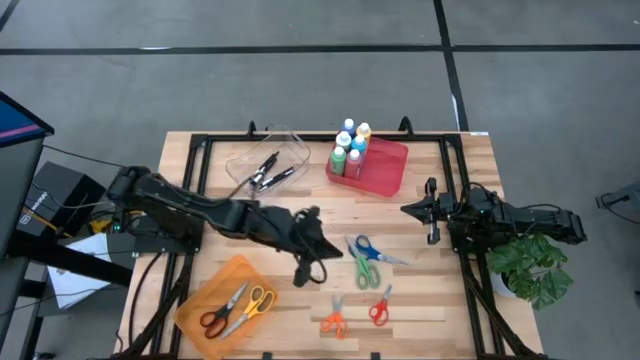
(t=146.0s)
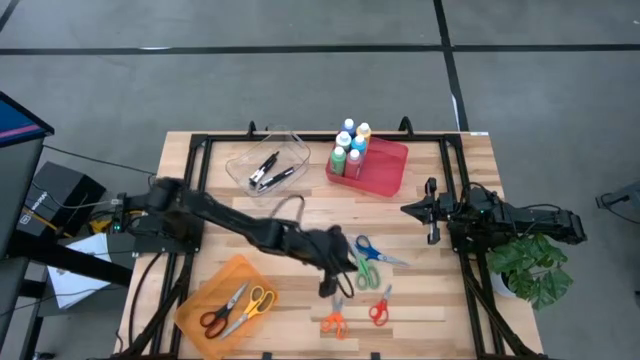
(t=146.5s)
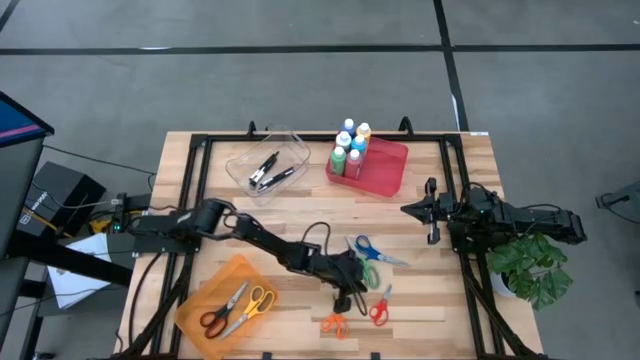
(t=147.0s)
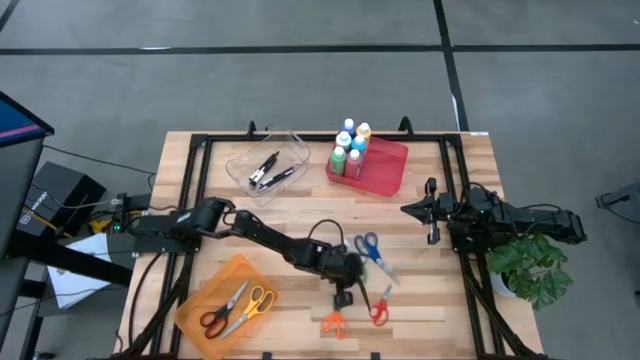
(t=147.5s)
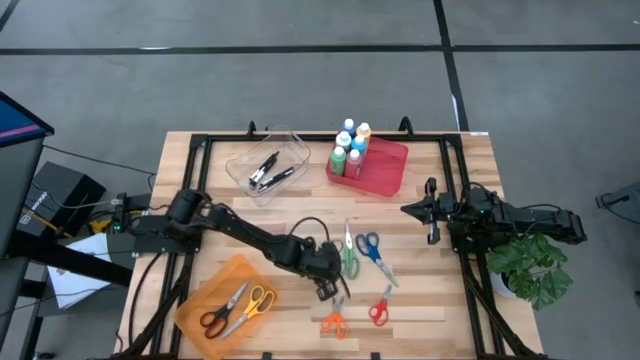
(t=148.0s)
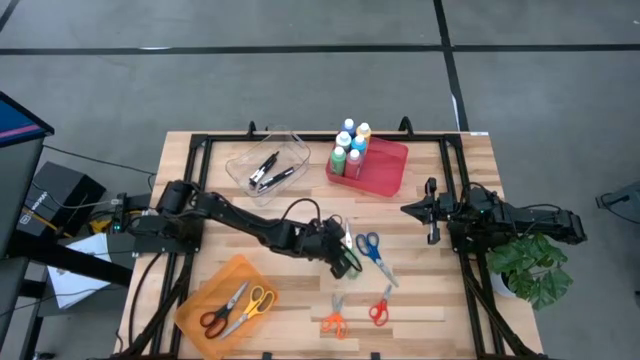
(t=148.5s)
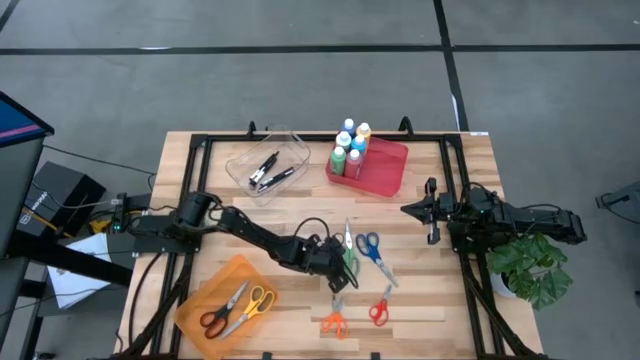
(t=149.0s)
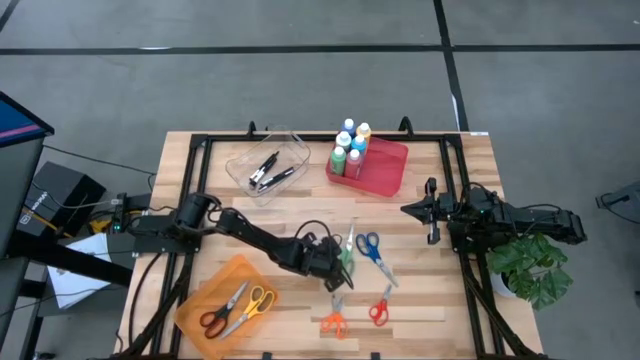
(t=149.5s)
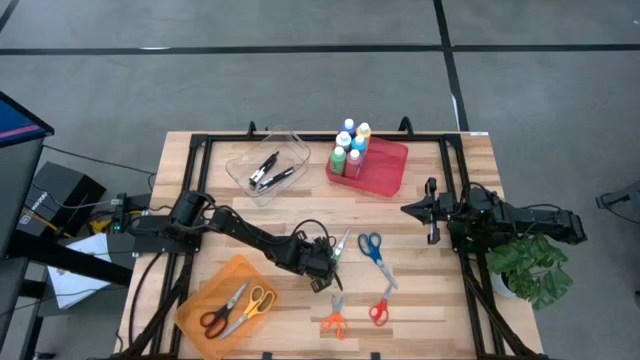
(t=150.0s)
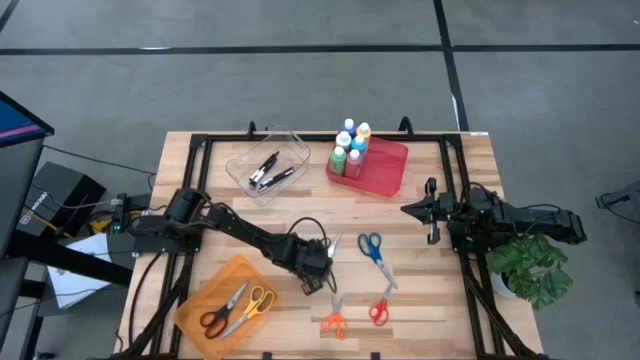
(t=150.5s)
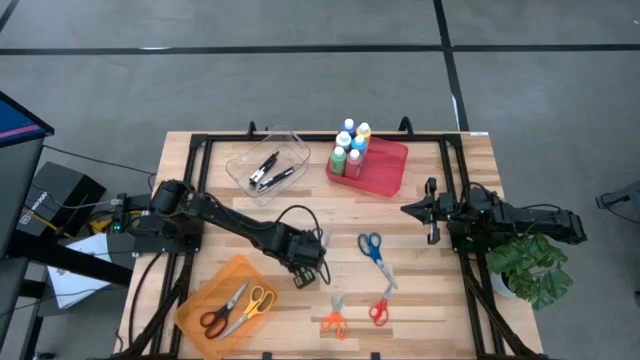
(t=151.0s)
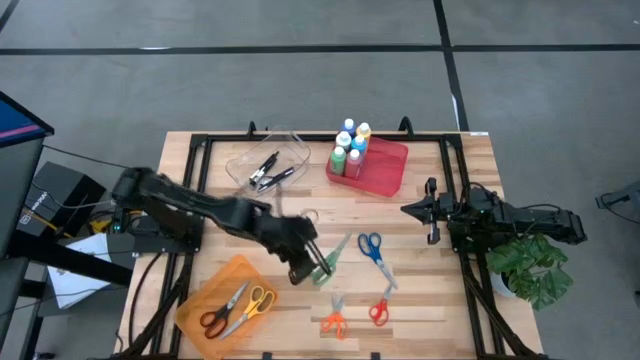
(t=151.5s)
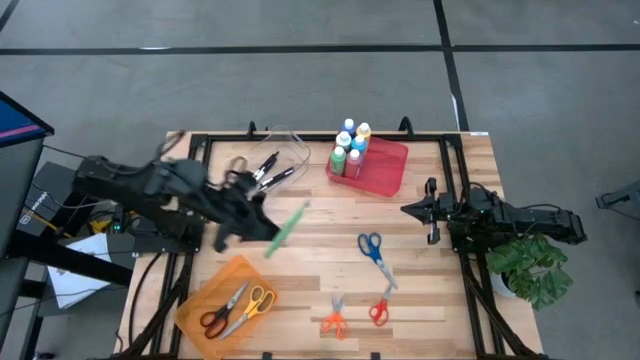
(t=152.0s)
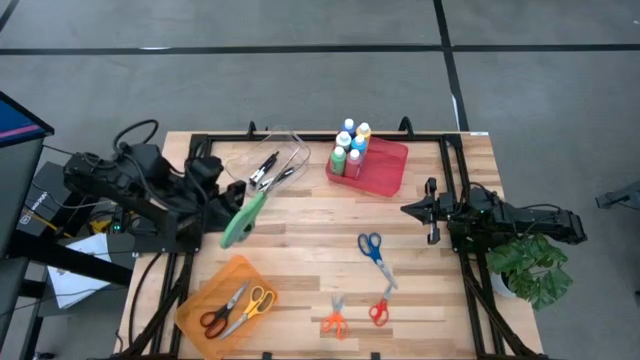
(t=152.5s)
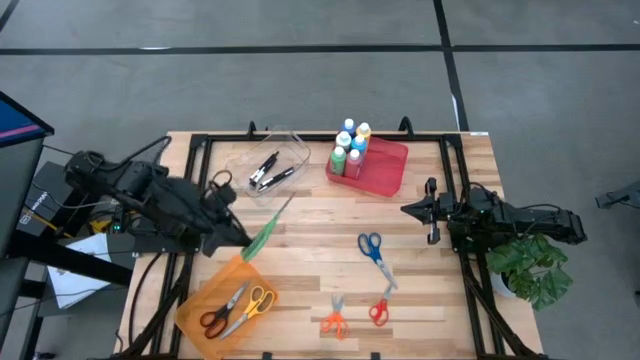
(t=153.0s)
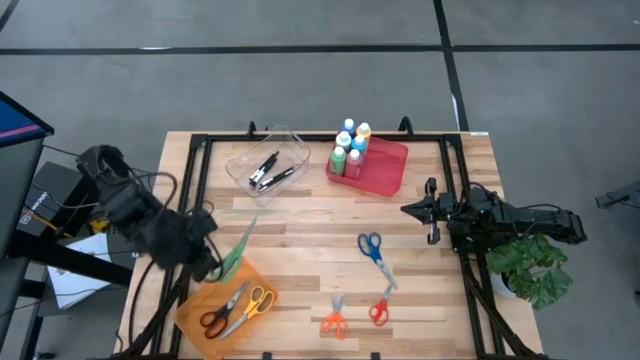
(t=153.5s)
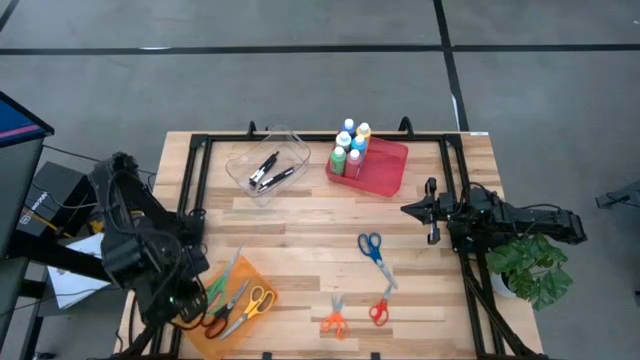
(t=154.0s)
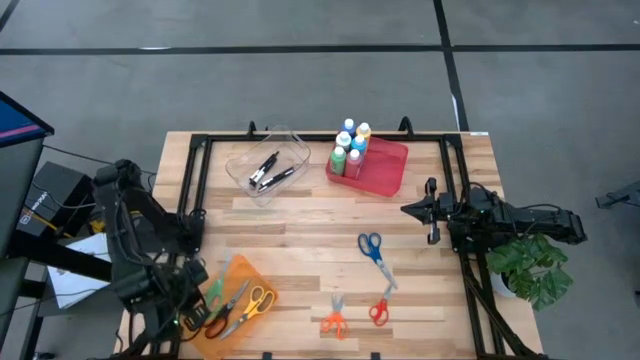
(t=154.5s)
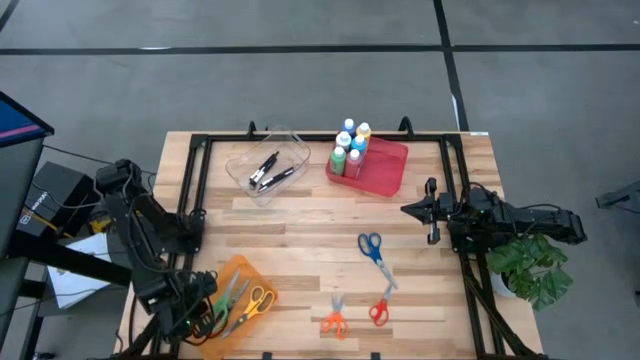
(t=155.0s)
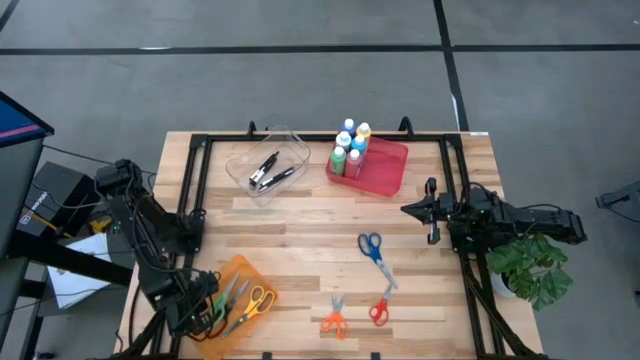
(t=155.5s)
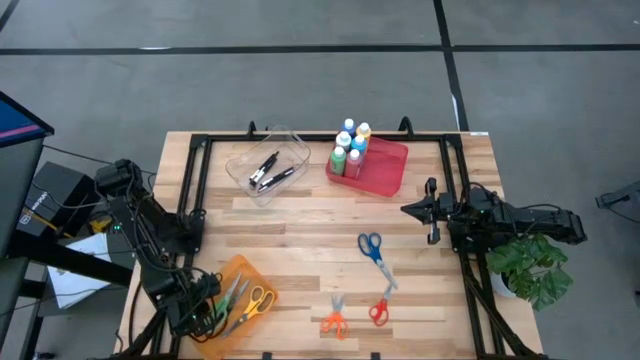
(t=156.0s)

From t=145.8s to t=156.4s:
Task: Pick & Place Paint Supplies
Put the black scissors into the orange bin

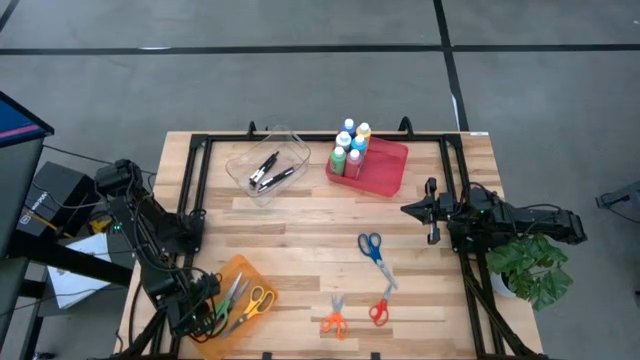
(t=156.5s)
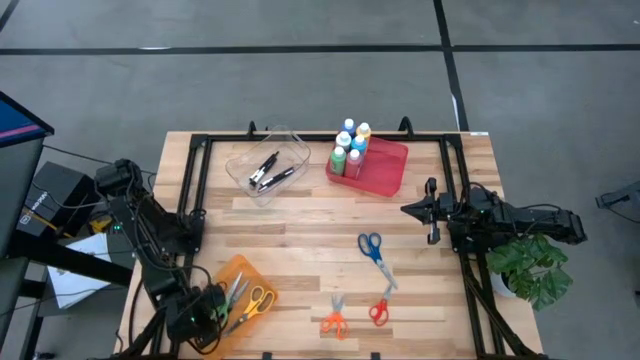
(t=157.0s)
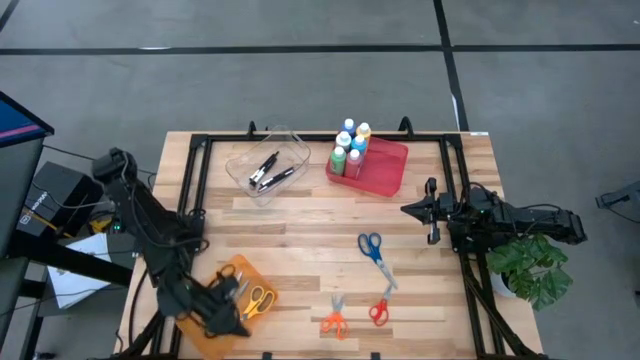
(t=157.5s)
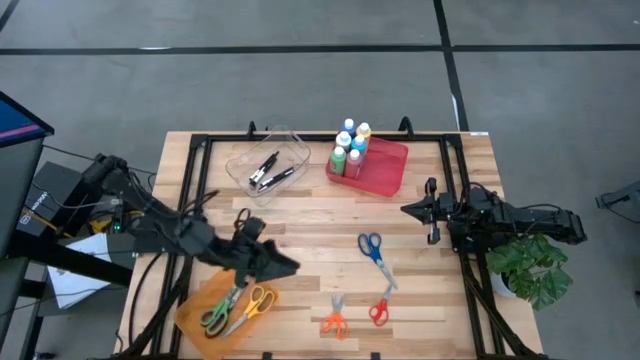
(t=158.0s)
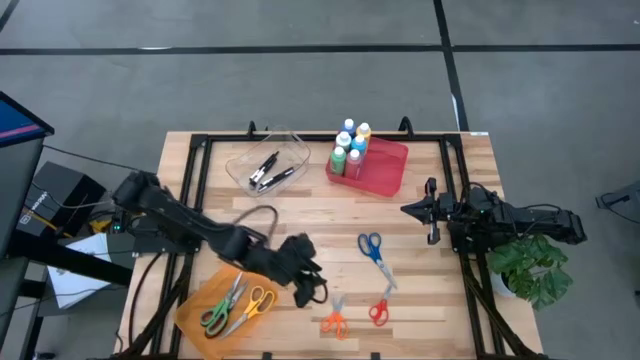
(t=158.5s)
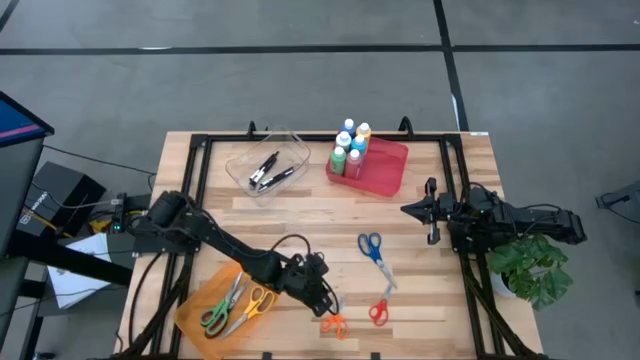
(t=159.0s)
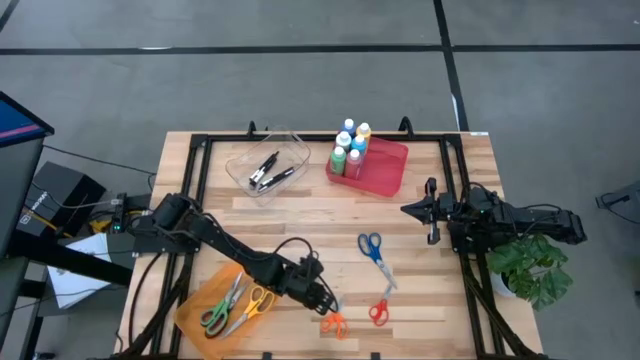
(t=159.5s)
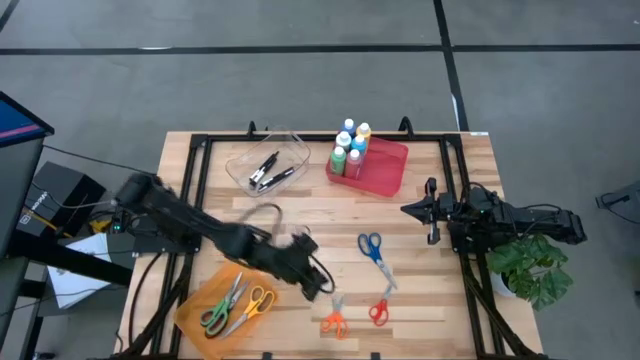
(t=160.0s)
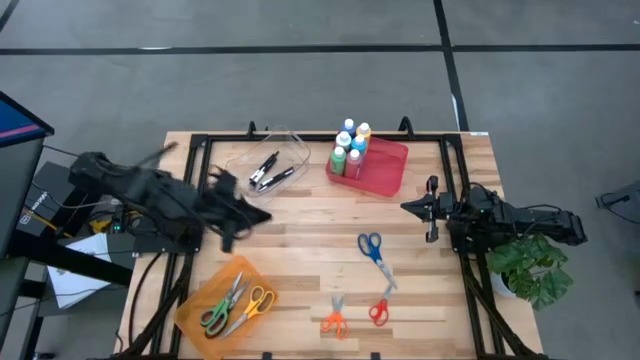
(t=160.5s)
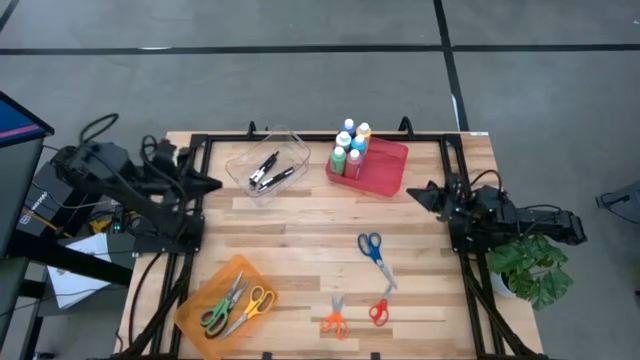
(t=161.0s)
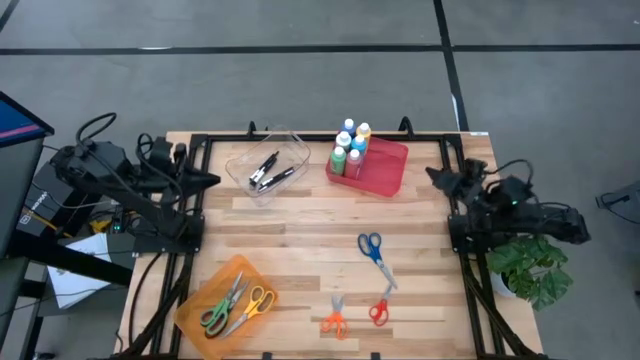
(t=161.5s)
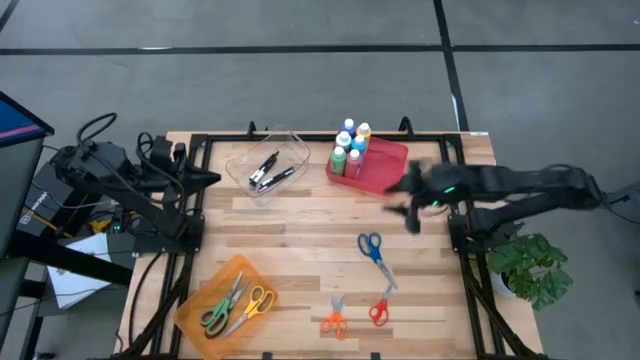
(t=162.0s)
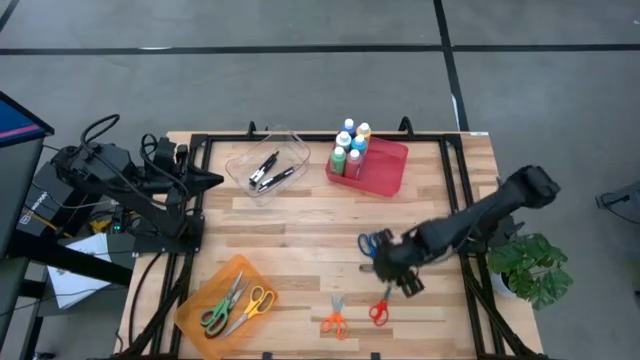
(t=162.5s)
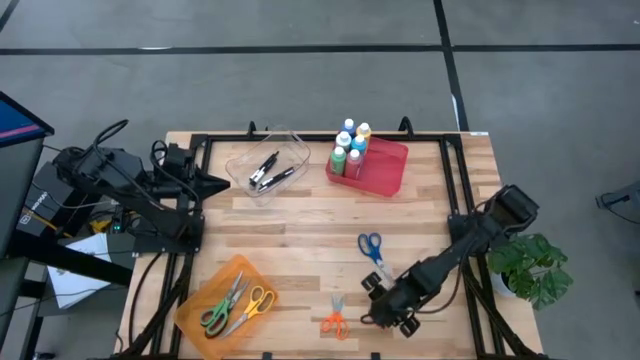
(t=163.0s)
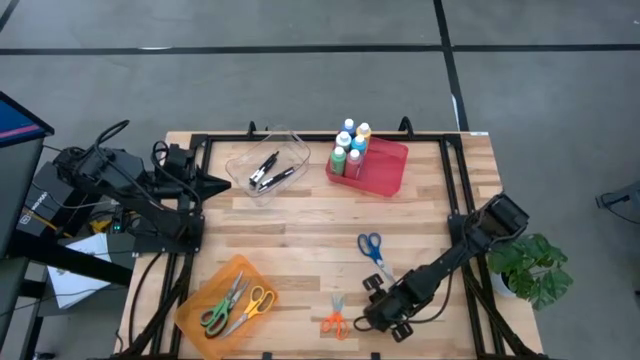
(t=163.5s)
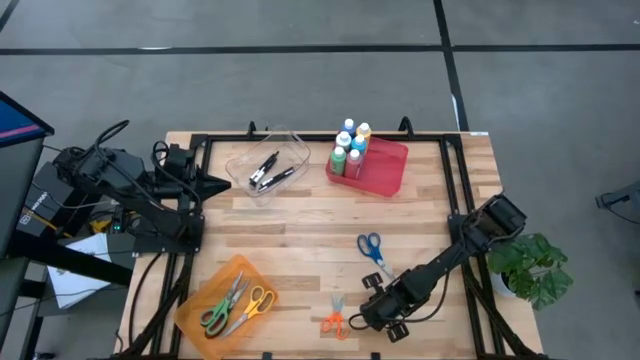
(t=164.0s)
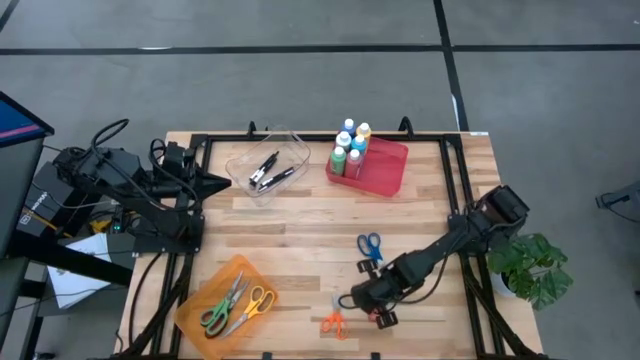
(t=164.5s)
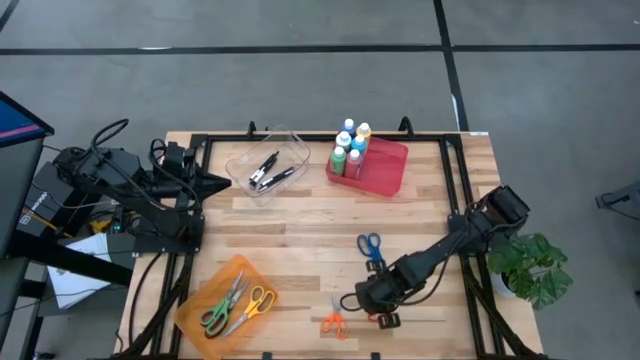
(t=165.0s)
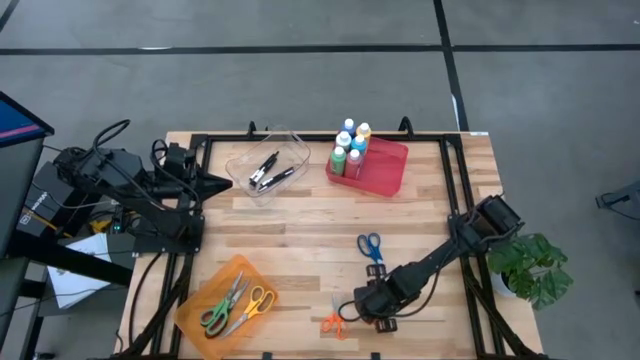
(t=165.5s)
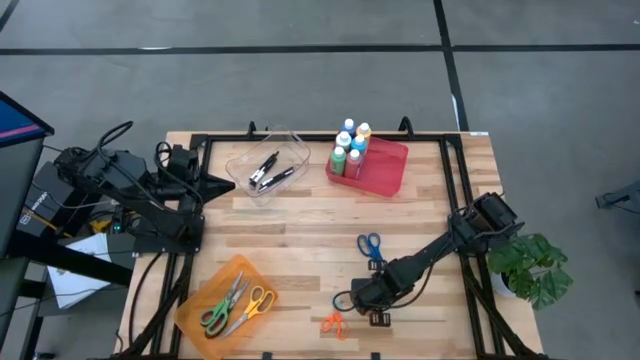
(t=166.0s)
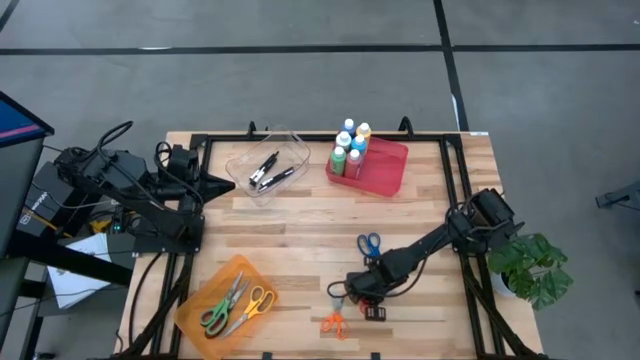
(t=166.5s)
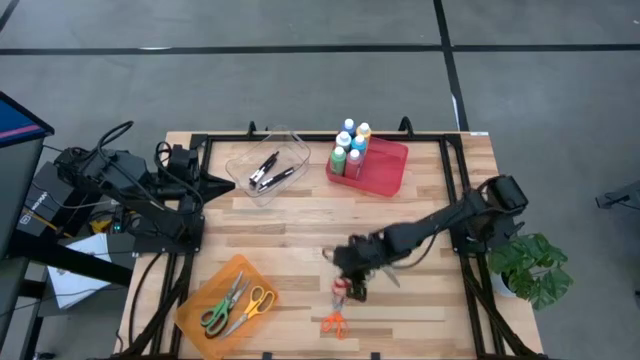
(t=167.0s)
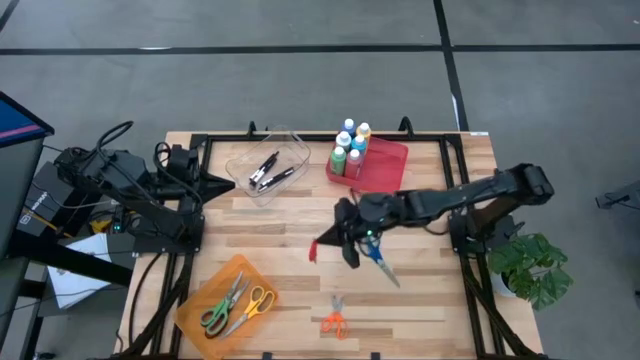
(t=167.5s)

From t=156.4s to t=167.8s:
Put the red scissors into the orange bin
